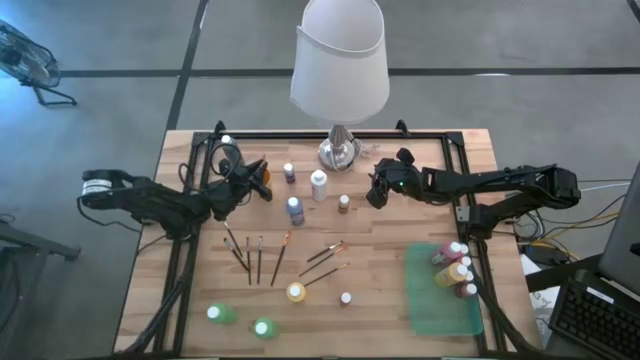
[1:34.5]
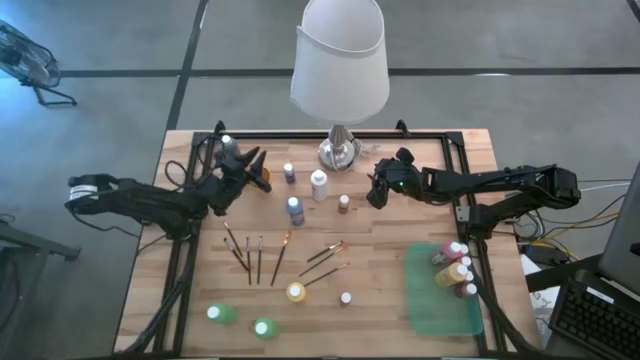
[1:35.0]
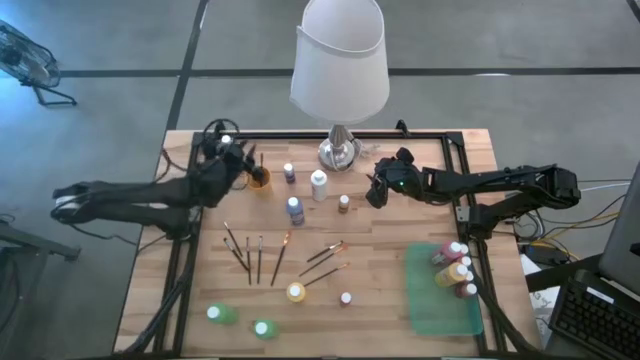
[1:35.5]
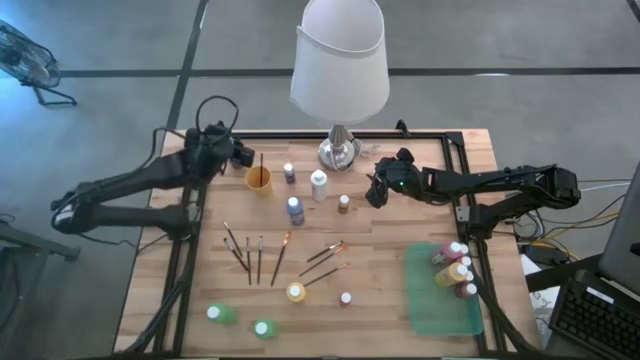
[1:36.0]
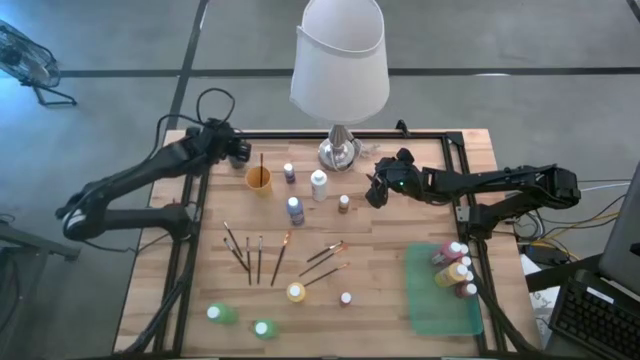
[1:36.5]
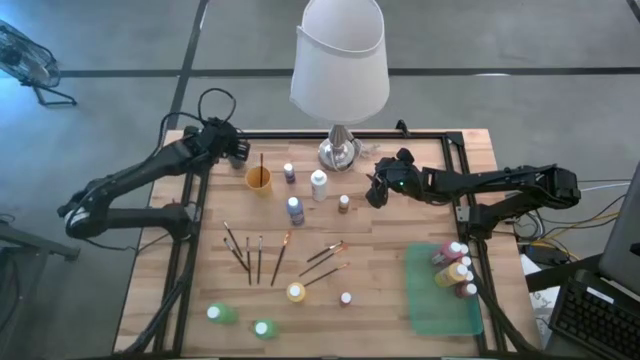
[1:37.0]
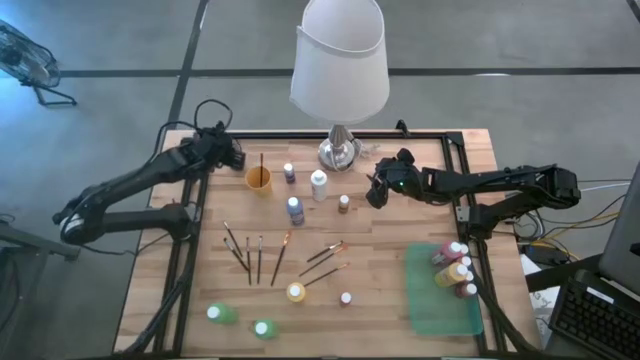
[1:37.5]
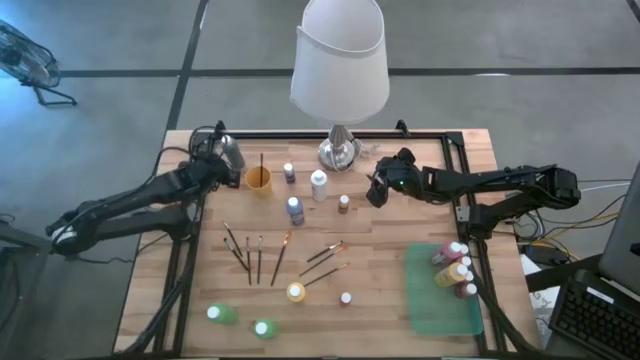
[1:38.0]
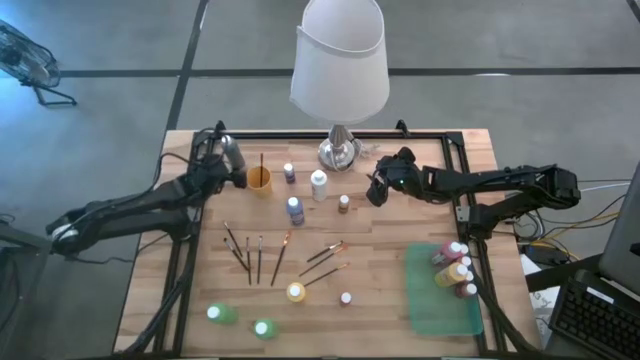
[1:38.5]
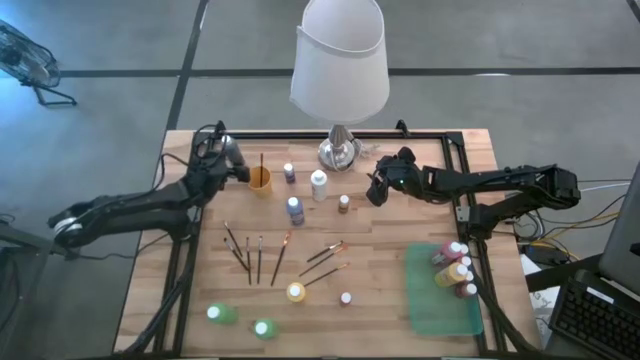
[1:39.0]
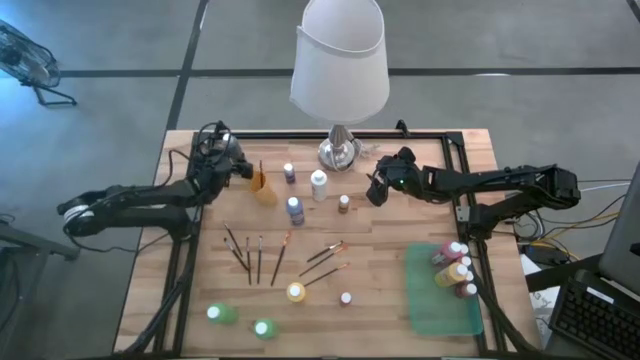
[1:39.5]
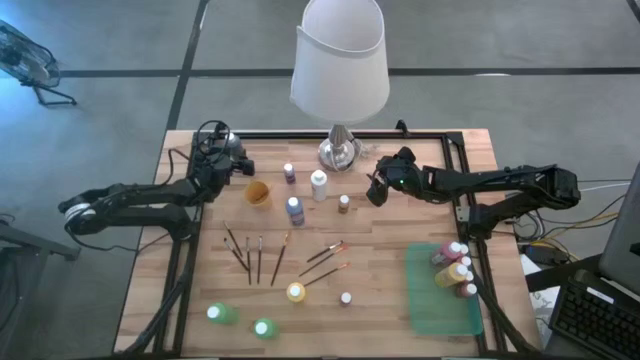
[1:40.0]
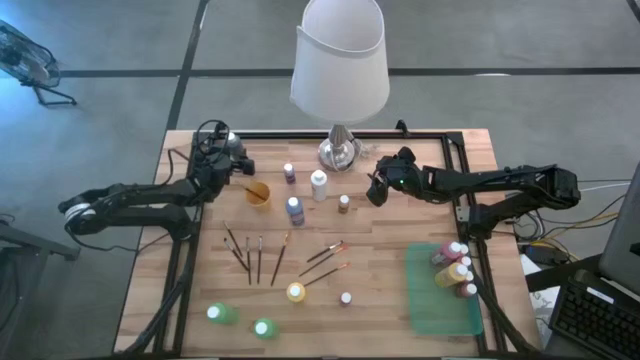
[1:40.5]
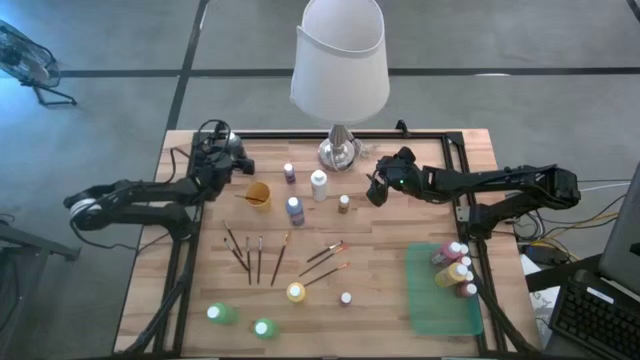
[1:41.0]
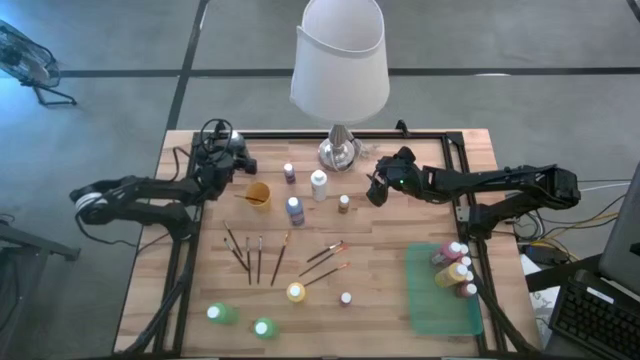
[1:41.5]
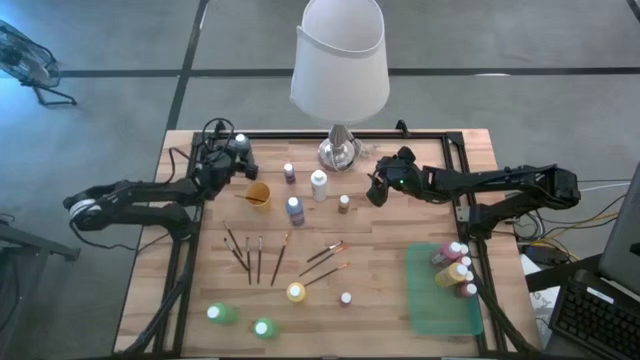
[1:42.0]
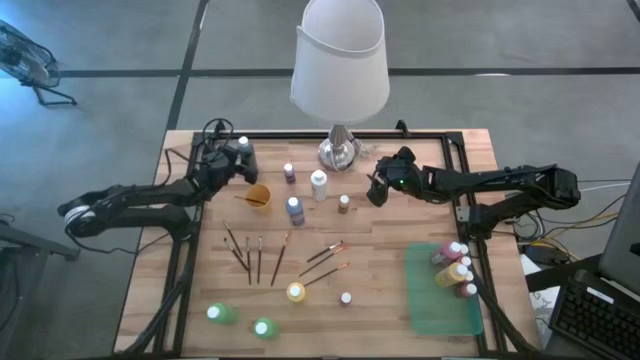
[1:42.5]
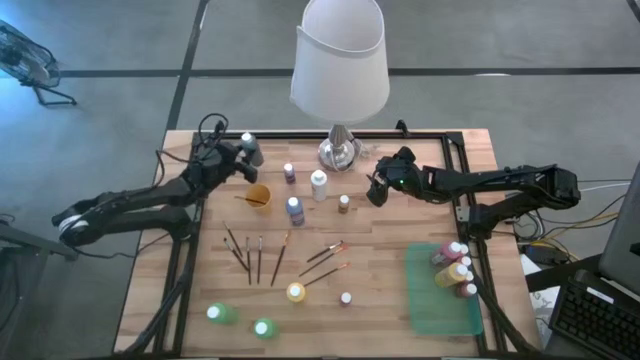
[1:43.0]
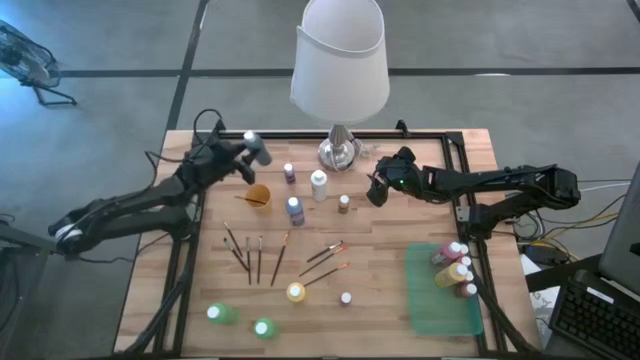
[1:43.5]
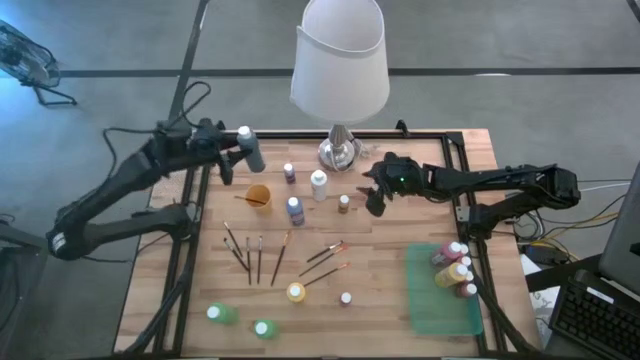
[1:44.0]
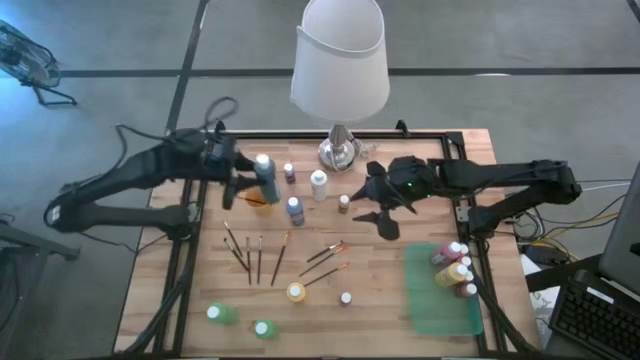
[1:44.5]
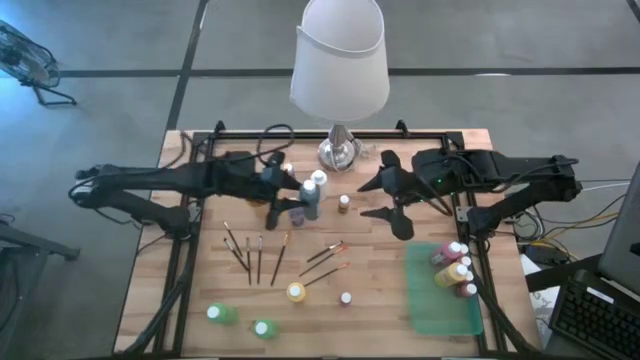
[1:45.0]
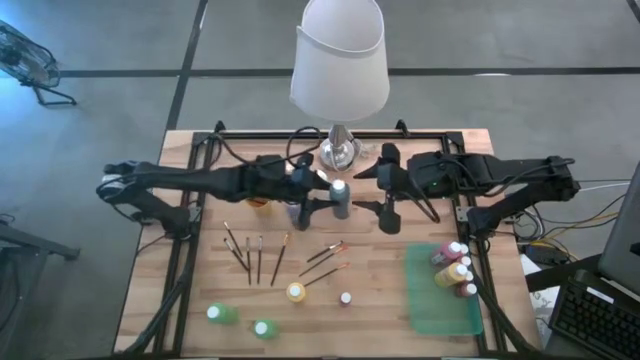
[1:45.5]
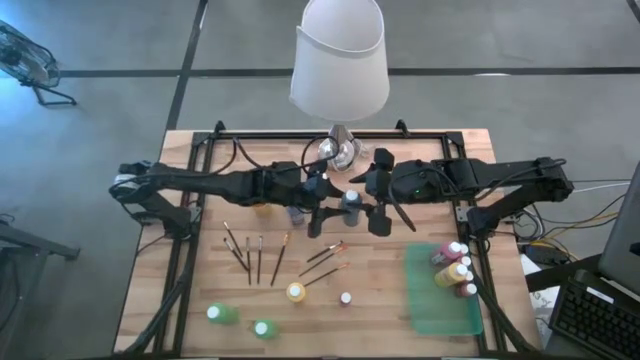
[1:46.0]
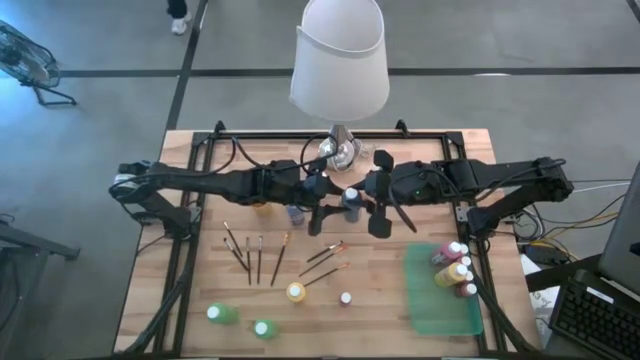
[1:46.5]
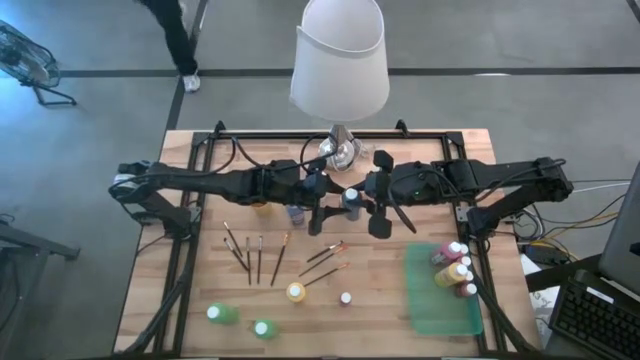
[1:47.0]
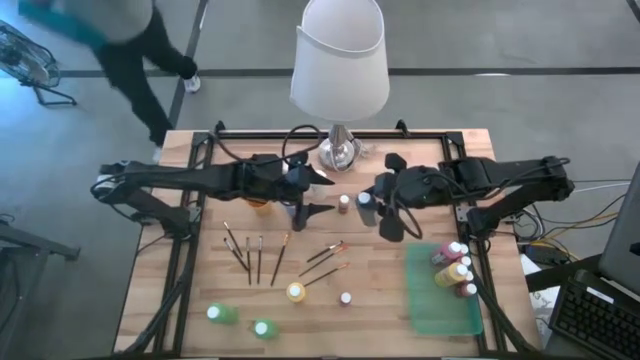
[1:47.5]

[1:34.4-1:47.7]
Task: Pick & Place Paint Supplies
Put the blue paint bottle into the green bin
